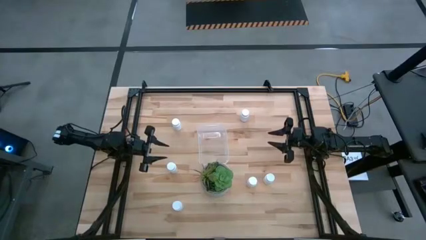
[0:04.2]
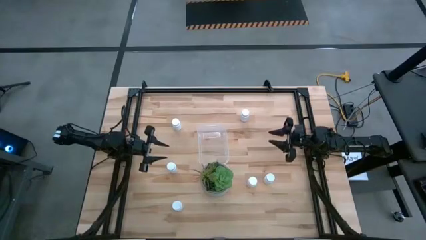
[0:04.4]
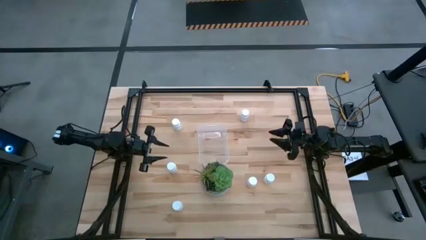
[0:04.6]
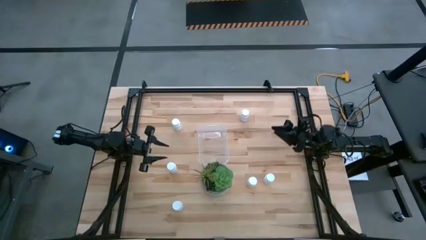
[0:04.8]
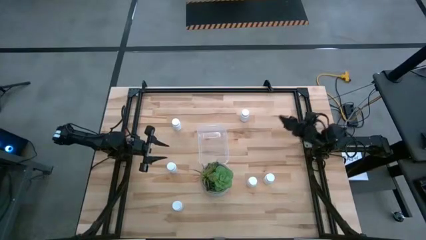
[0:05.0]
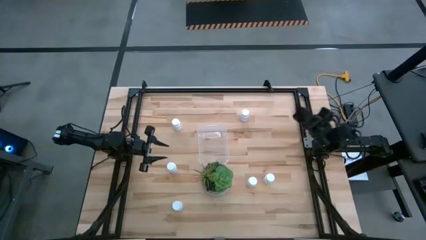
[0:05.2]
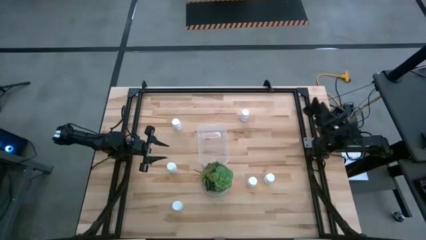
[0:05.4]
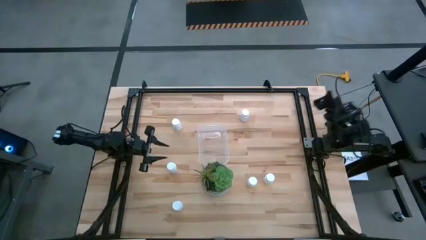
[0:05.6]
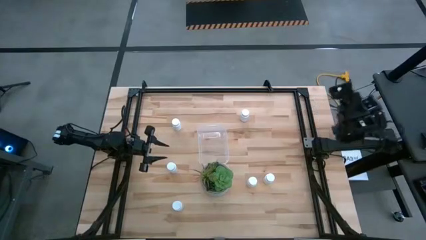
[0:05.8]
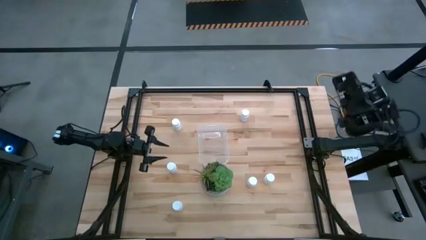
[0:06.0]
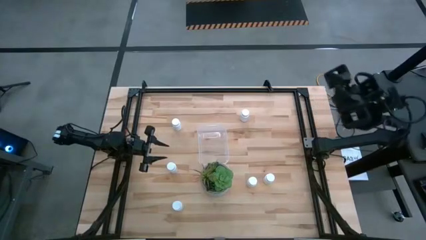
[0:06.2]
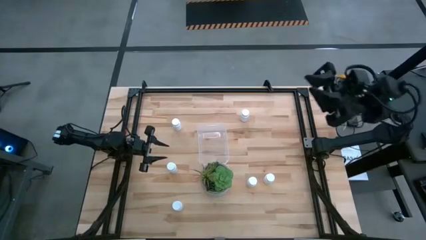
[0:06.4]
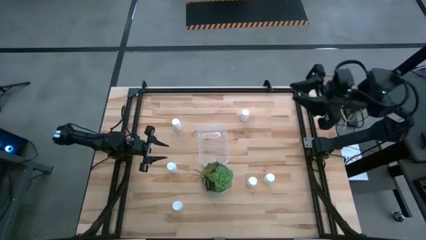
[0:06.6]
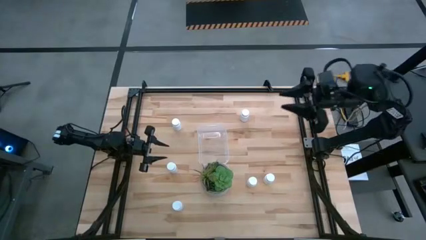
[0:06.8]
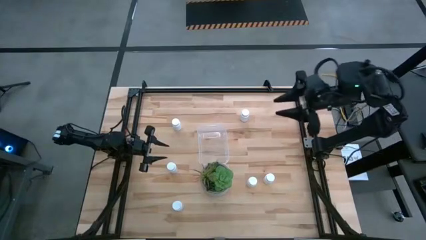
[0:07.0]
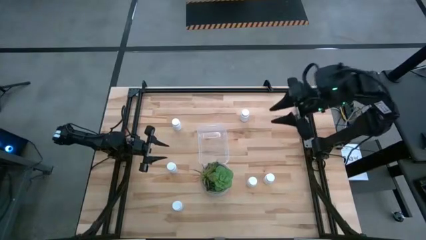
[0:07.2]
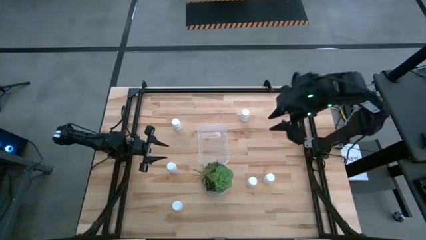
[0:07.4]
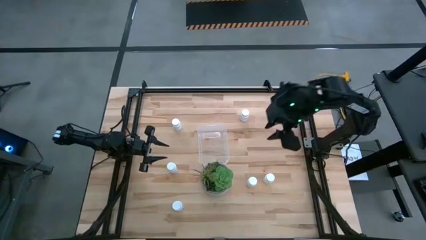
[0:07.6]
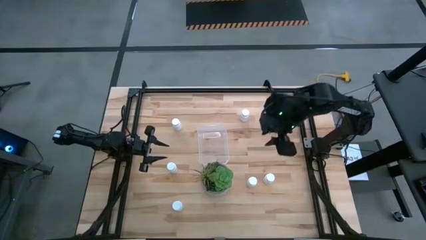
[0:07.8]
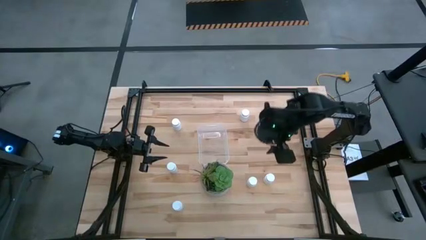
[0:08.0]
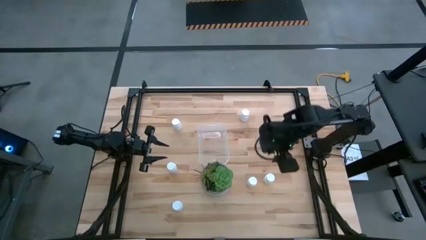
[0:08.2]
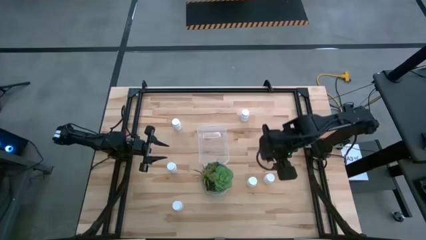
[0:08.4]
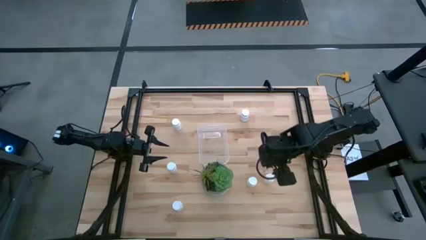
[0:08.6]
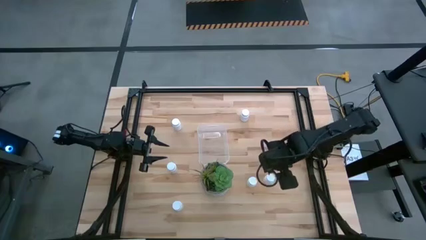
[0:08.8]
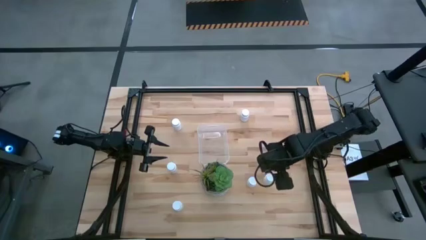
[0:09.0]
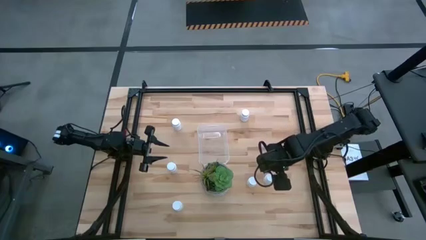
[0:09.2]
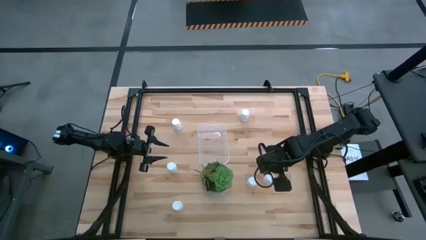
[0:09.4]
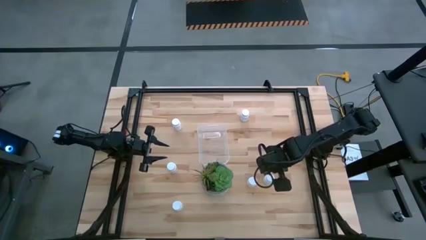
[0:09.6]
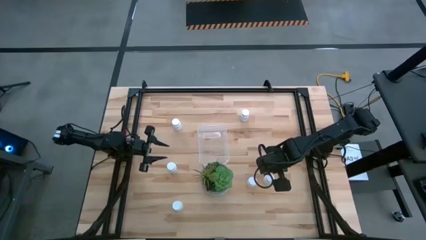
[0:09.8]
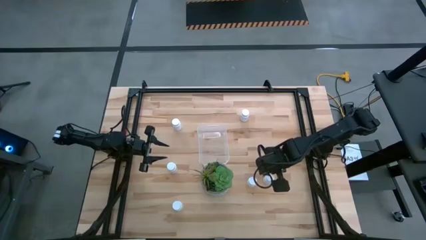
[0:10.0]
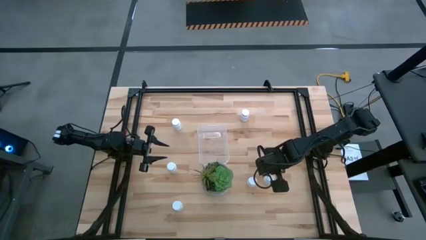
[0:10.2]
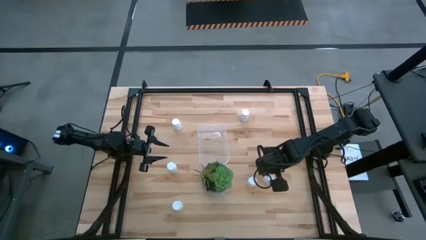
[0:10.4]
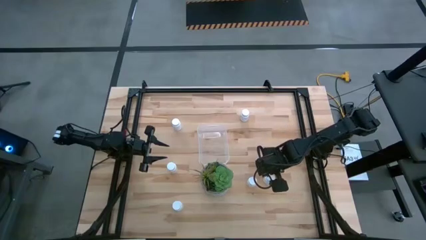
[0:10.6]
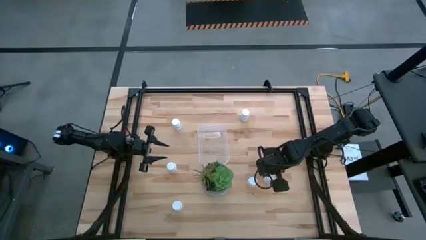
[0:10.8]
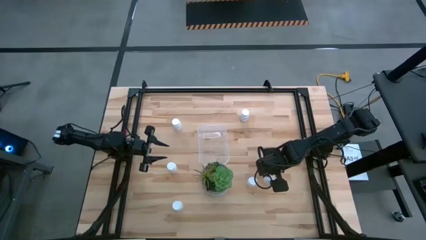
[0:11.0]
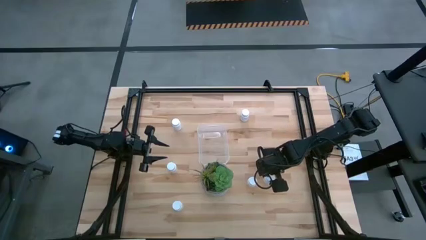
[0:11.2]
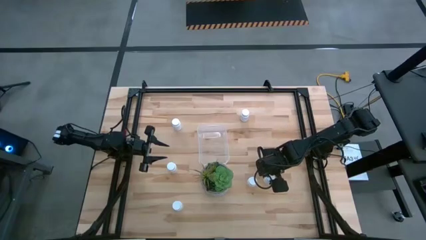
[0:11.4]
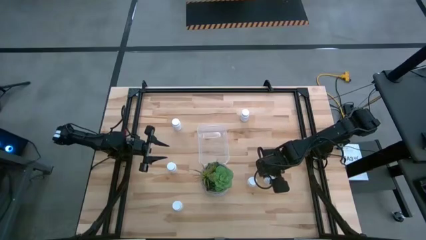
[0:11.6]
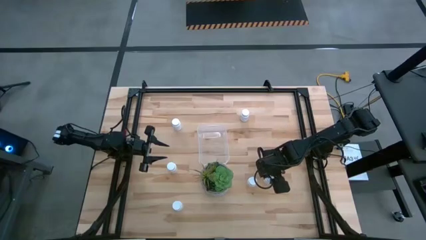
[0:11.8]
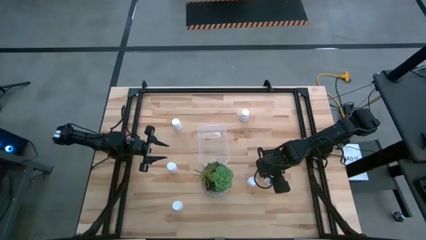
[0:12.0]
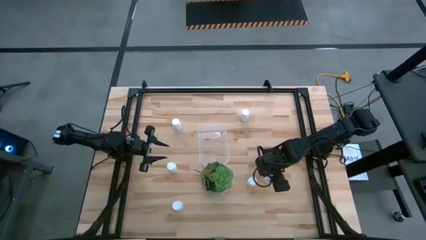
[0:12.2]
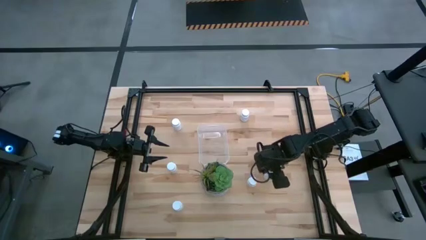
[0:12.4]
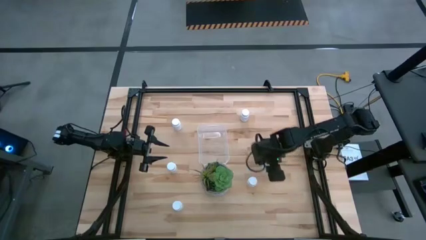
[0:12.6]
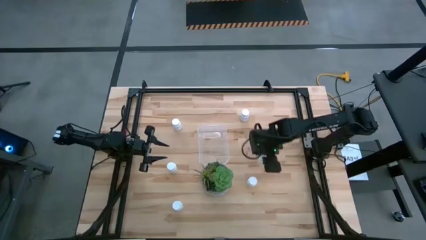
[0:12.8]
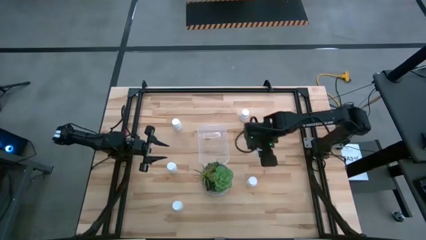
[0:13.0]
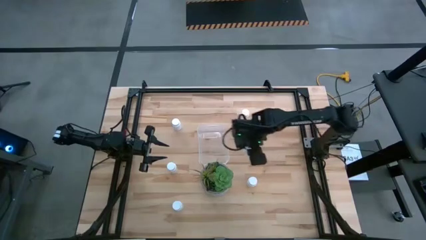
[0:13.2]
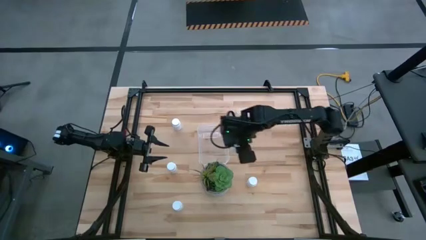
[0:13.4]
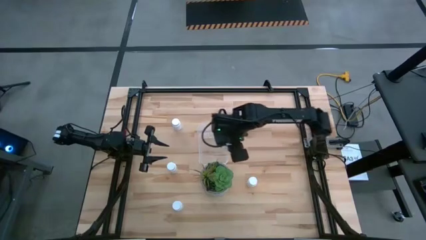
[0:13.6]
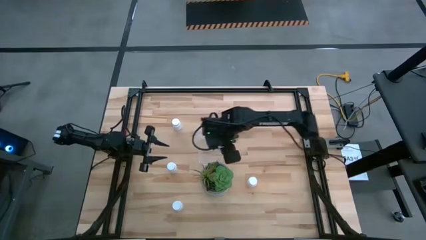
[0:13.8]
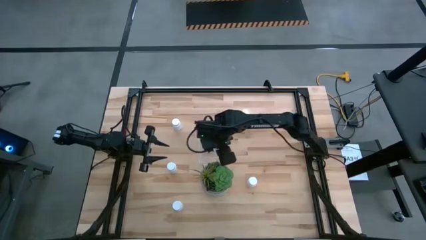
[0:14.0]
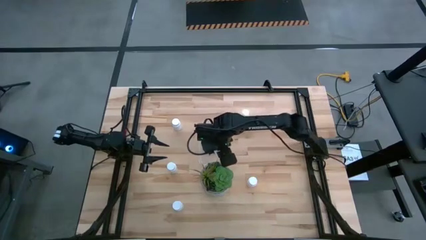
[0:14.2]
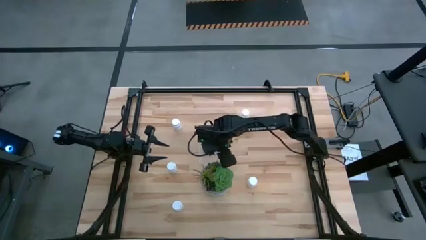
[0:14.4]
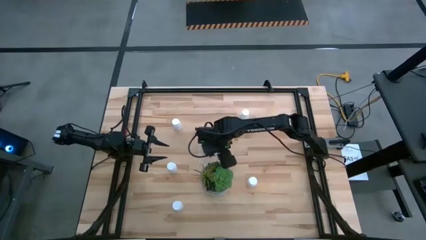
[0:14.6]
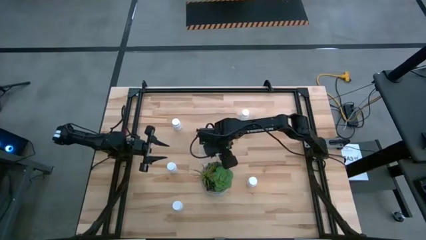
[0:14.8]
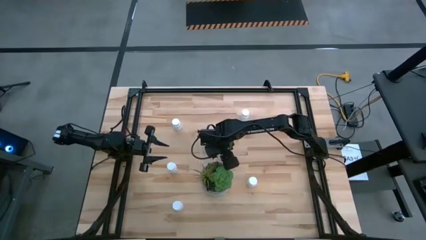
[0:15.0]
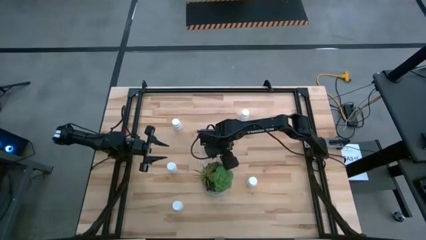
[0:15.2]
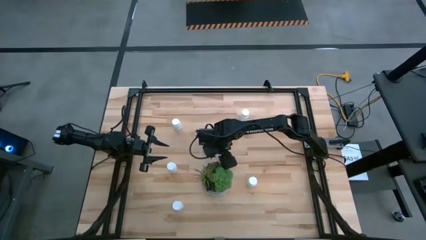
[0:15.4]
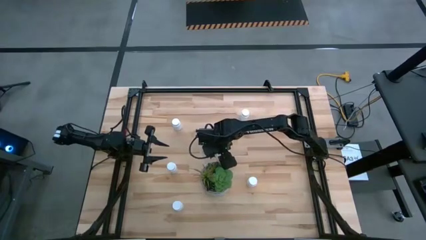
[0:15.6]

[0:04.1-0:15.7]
Task: Pick and place pill bottles into a basket
Put the white pill bottle into the transparent bin

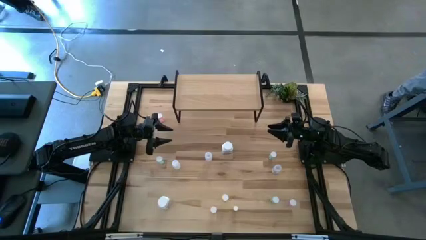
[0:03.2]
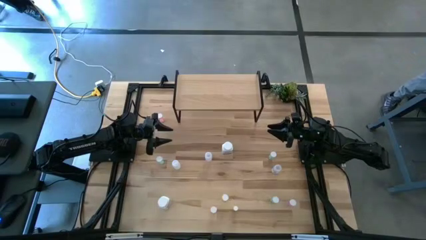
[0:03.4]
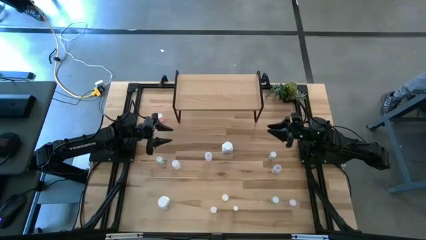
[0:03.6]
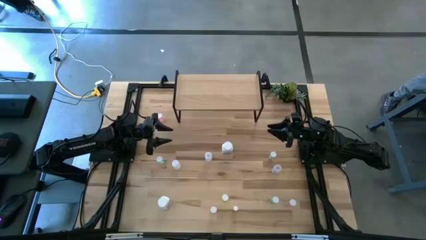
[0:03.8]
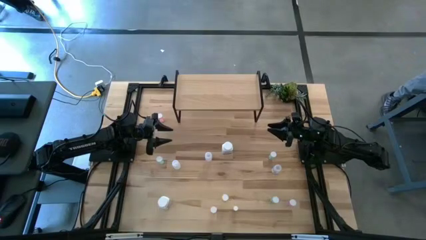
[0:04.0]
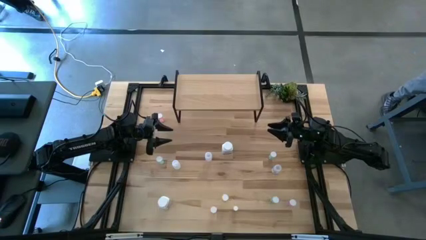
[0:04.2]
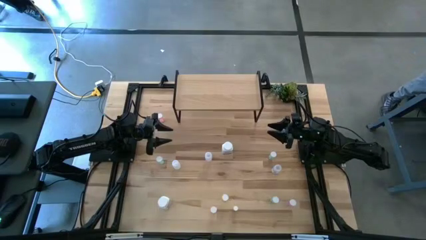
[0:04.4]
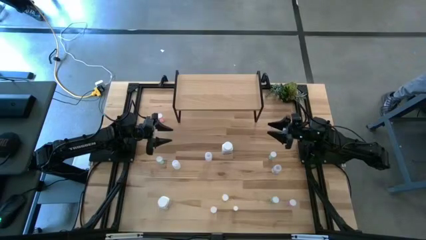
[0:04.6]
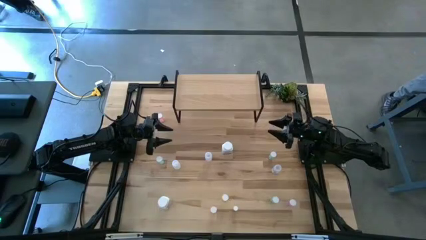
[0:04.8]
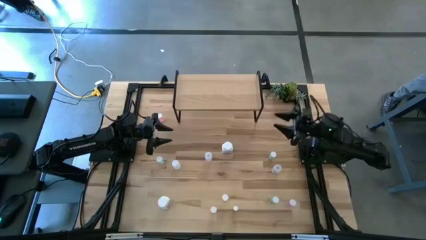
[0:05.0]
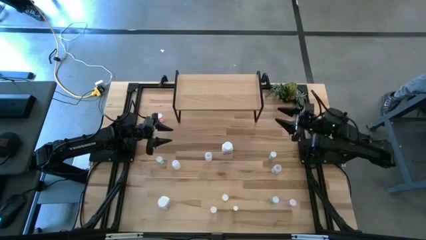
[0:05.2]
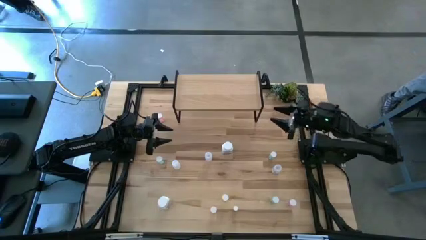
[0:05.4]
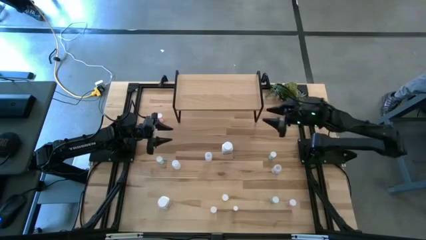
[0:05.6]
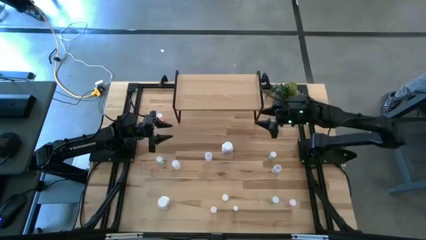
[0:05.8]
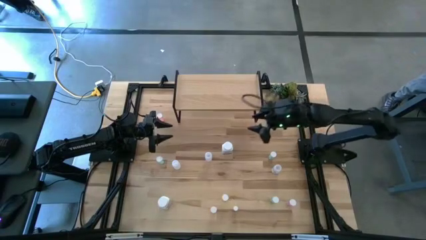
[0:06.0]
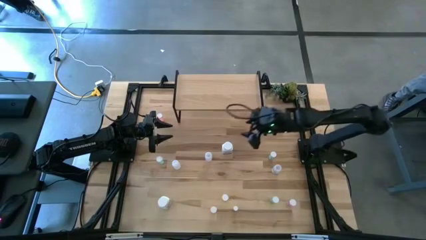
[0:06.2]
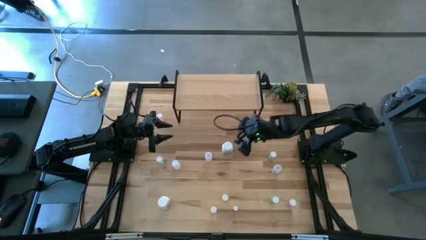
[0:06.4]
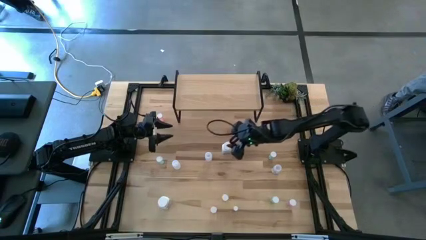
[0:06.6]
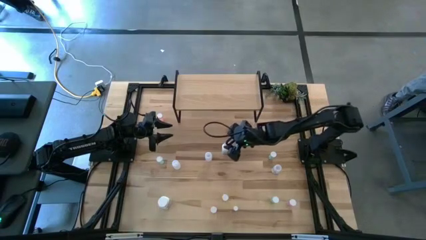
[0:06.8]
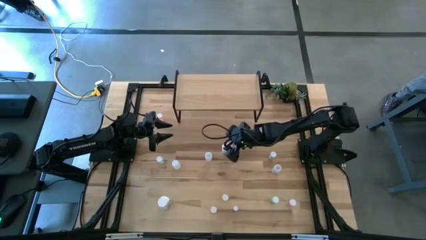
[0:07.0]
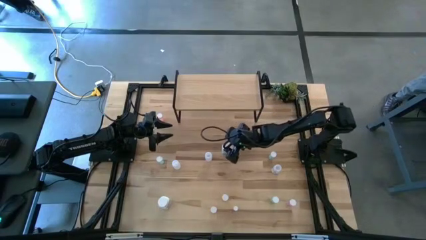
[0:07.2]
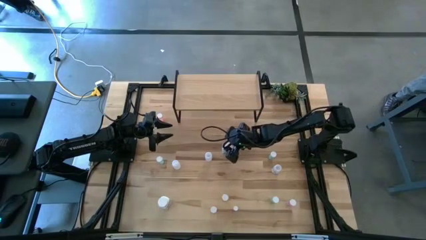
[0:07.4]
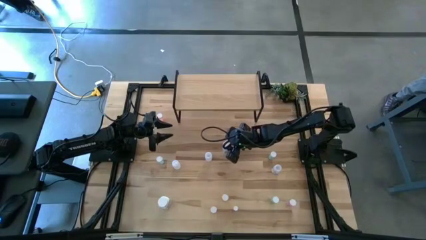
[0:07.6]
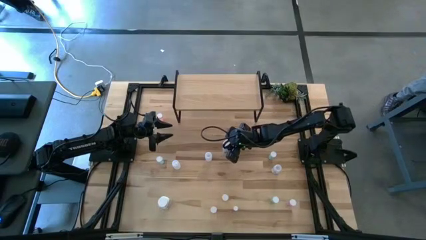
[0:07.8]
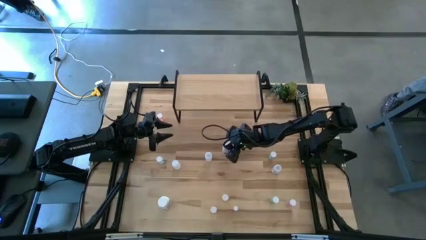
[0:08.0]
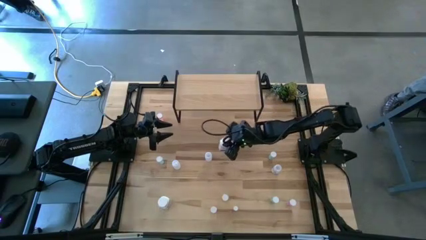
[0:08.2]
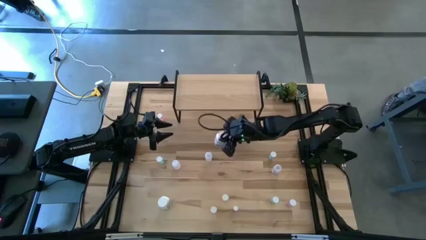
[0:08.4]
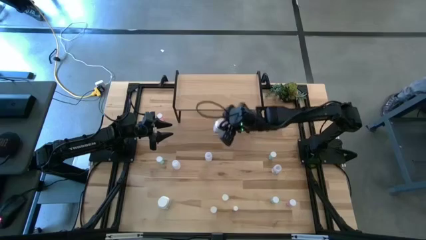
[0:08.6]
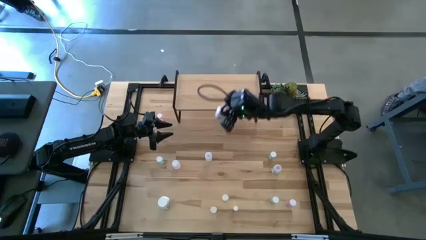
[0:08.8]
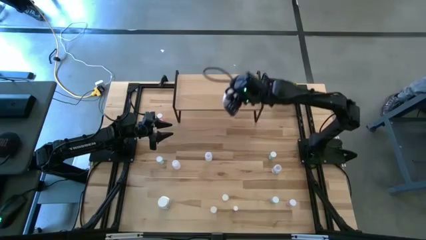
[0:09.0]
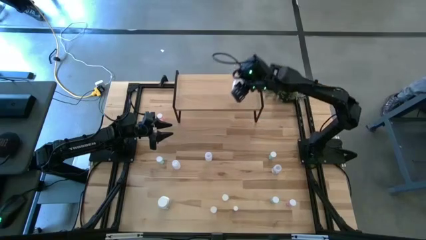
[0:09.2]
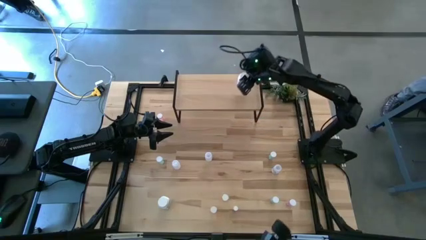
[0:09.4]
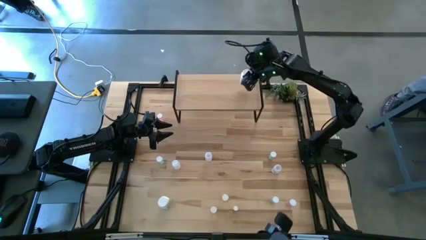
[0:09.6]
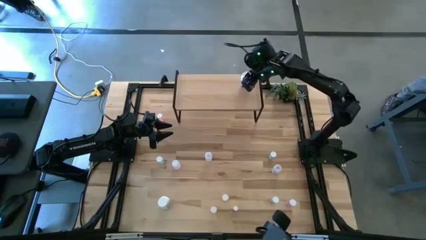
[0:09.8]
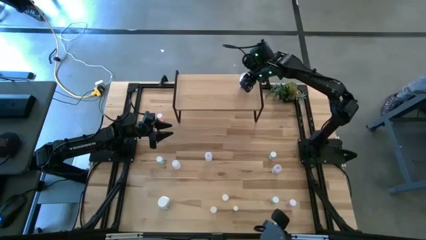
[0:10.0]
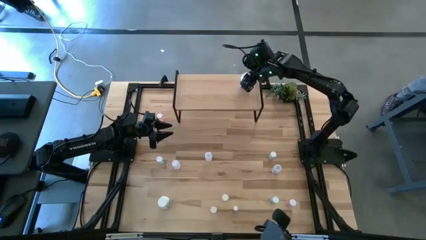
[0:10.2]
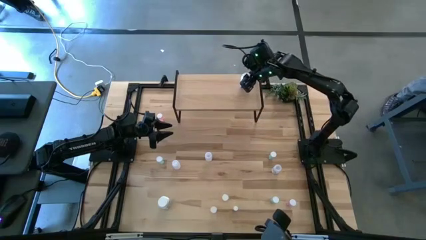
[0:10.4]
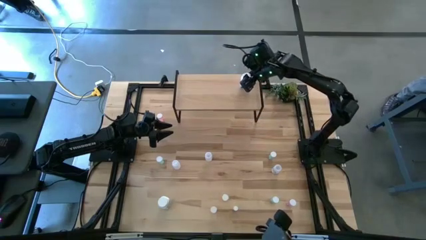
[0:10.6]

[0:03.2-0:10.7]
Task: Pick and place medicine bottles onto shelf by color
Put the top white pill bottle on the shelf
